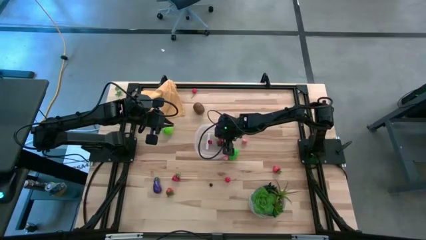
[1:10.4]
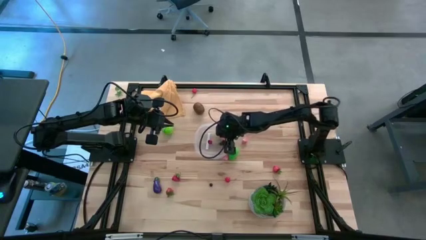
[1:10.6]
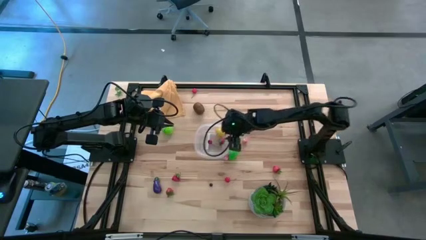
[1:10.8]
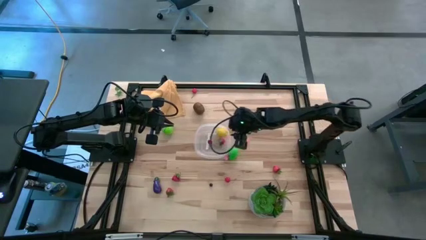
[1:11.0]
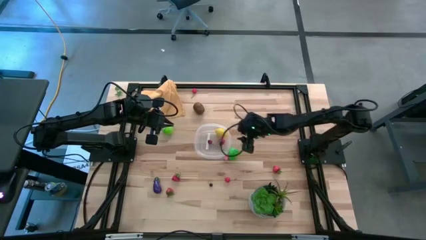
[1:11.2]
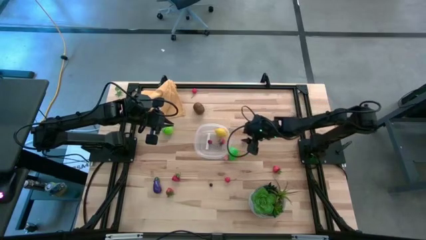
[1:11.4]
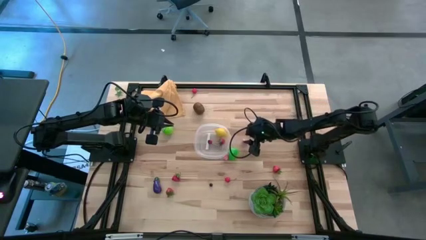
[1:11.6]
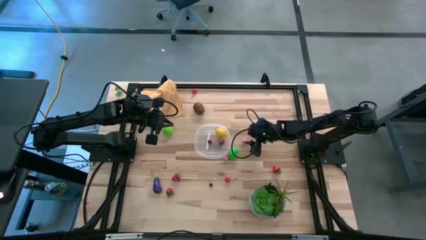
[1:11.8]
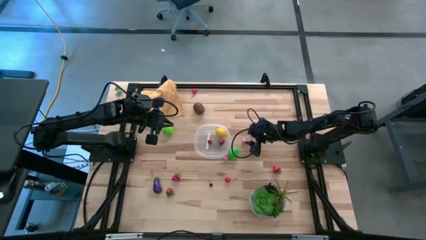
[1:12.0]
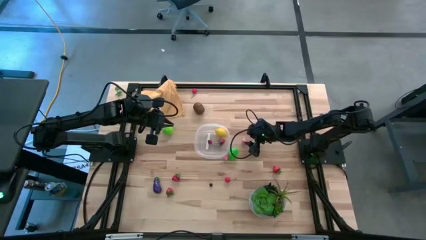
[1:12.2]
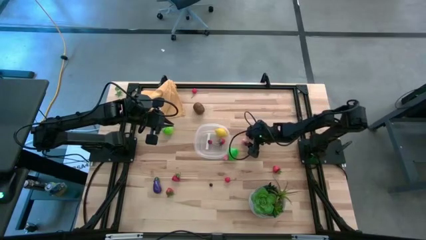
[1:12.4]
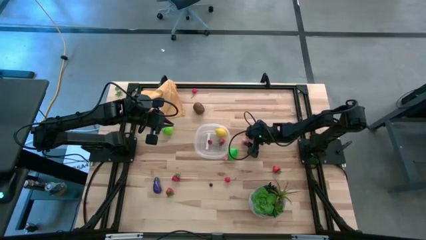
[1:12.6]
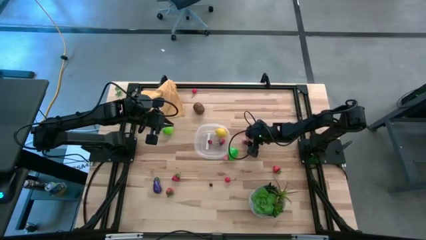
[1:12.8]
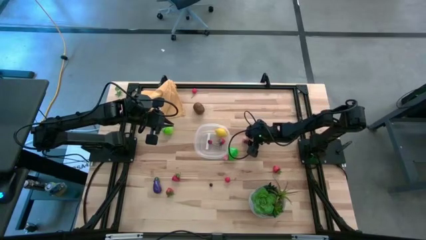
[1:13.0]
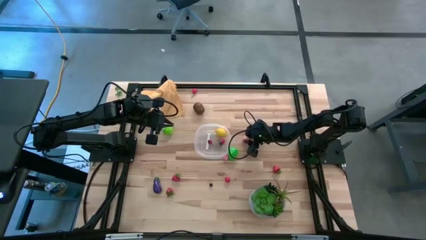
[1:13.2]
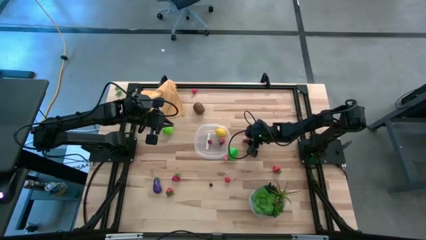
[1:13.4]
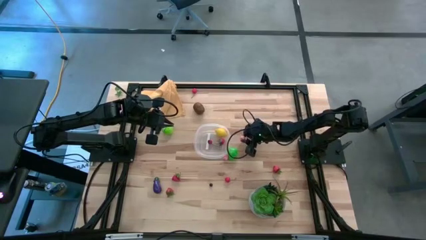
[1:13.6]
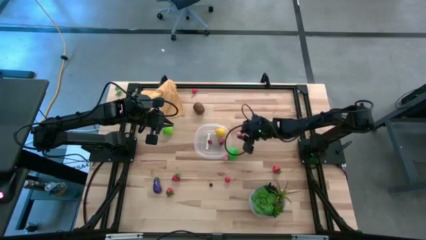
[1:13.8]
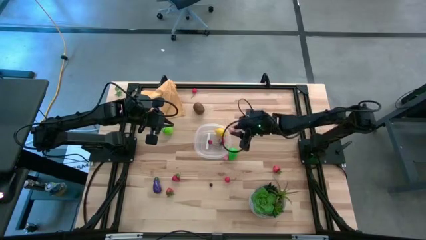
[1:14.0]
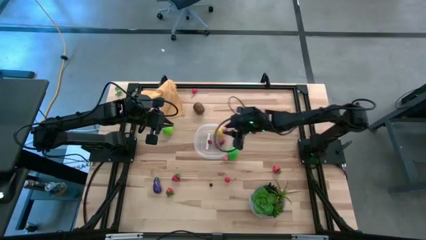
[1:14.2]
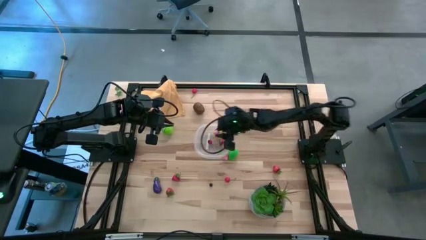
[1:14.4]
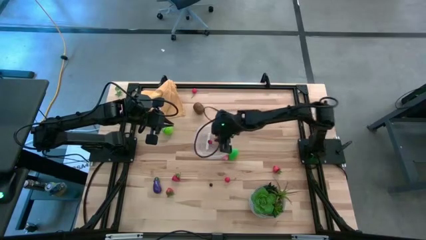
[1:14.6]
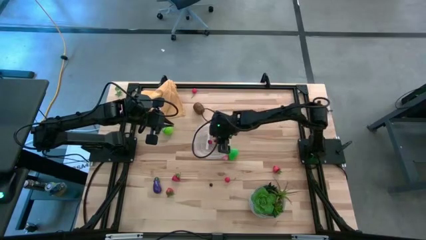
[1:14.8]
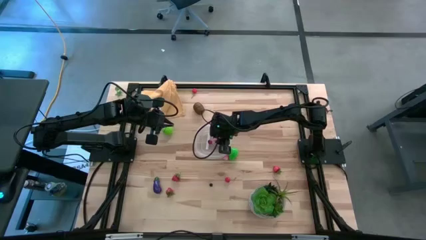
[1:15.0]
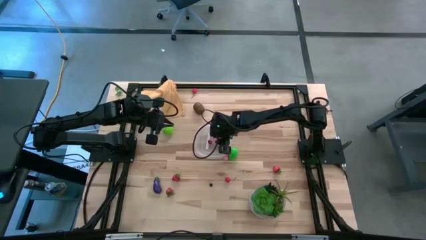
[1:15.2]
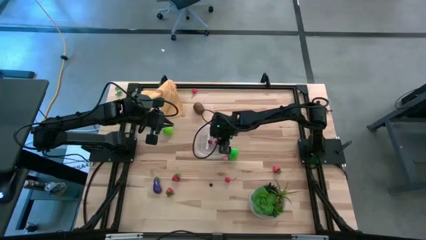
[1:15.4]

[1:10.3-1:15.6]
Task: Pick and placing Produce into tupperware
Put the top apricot into the transparent bin

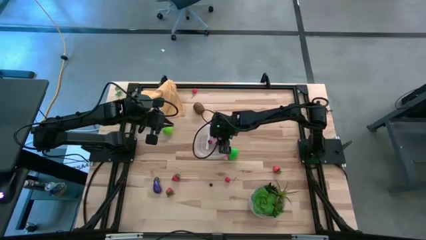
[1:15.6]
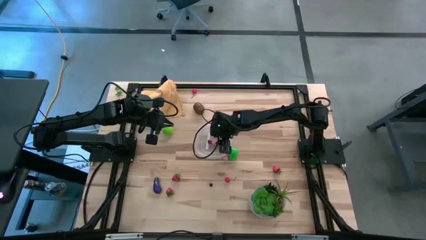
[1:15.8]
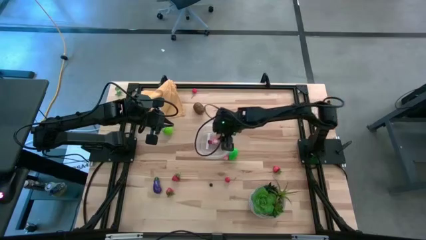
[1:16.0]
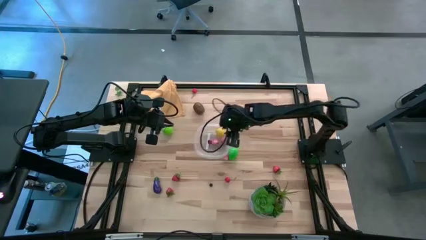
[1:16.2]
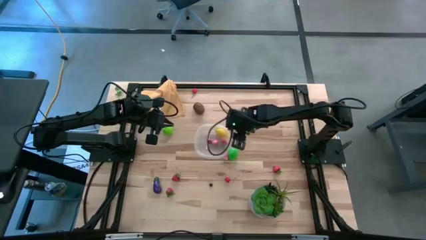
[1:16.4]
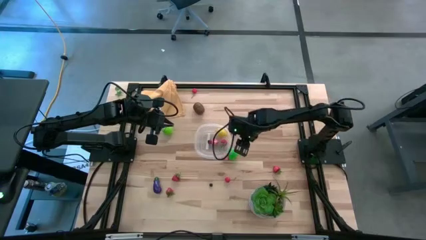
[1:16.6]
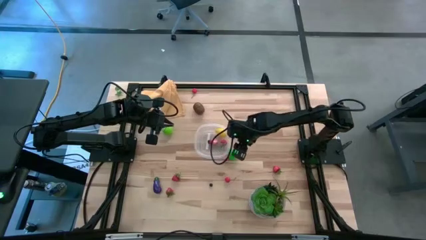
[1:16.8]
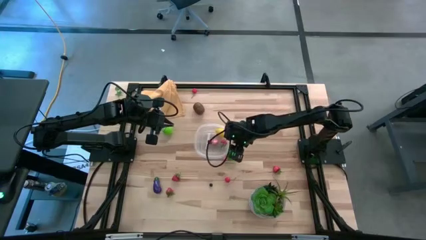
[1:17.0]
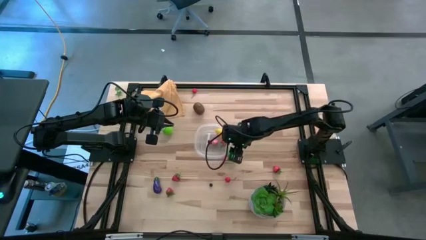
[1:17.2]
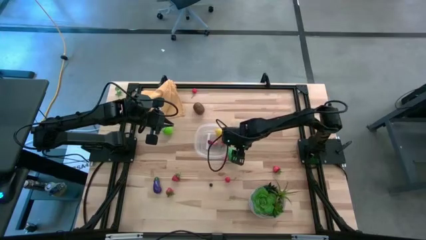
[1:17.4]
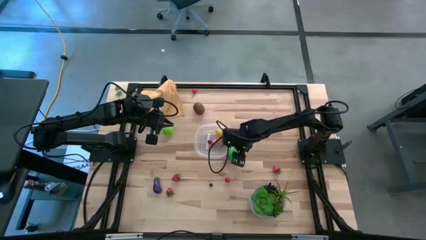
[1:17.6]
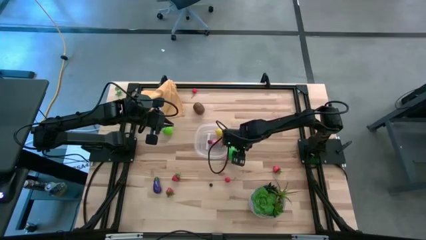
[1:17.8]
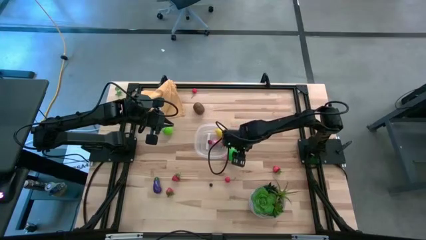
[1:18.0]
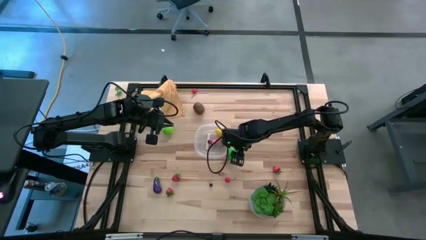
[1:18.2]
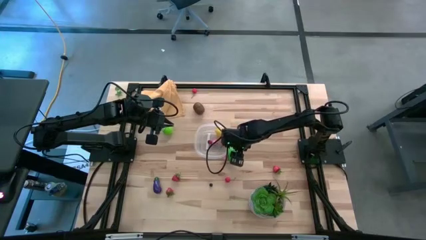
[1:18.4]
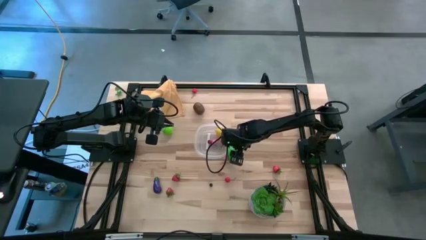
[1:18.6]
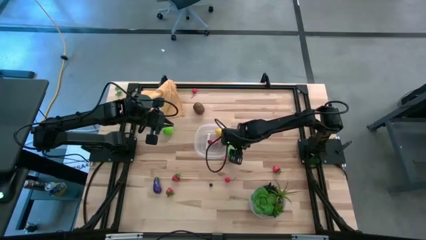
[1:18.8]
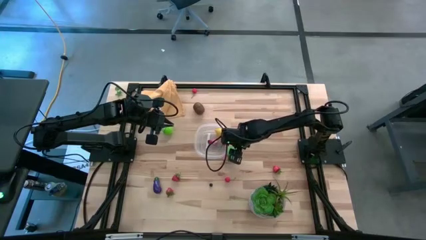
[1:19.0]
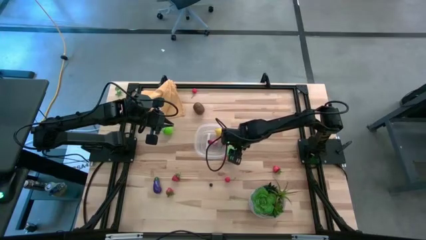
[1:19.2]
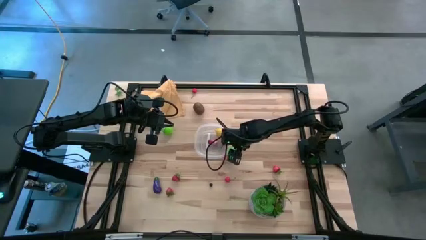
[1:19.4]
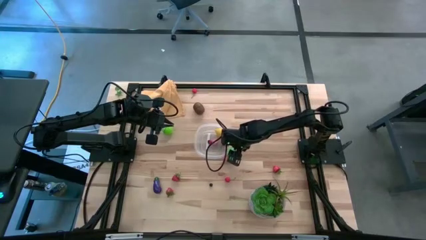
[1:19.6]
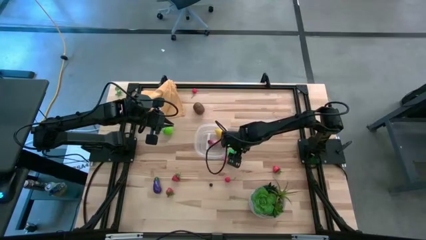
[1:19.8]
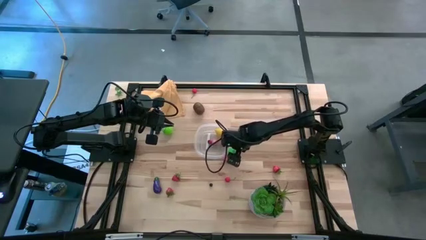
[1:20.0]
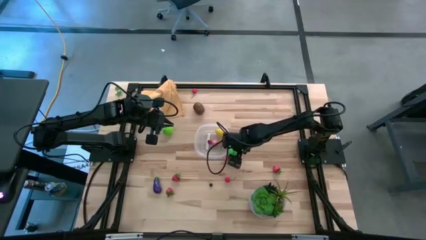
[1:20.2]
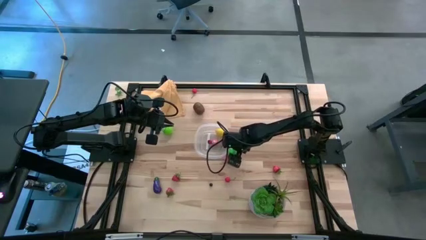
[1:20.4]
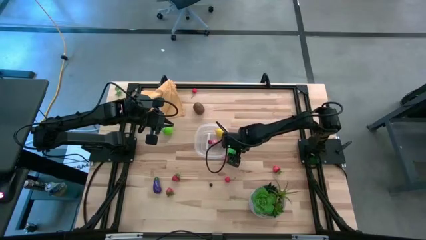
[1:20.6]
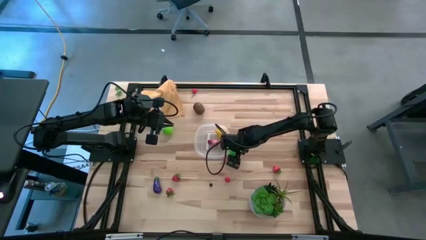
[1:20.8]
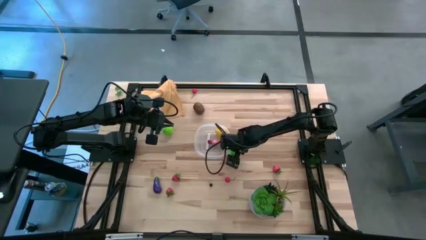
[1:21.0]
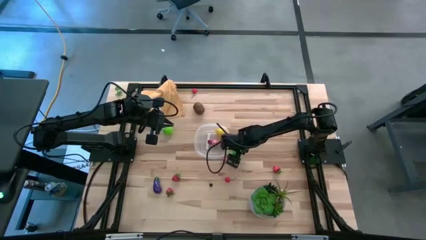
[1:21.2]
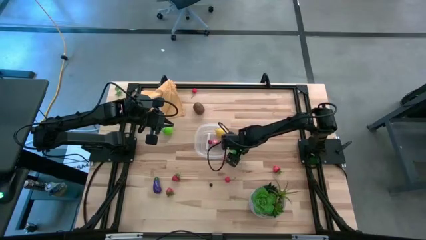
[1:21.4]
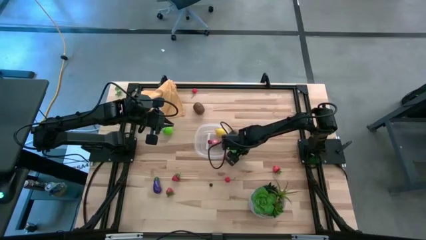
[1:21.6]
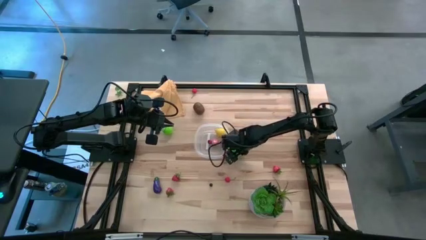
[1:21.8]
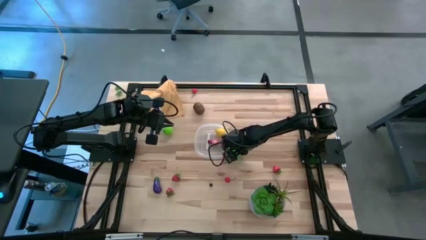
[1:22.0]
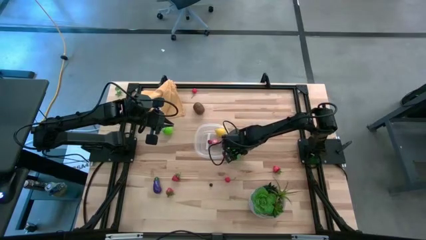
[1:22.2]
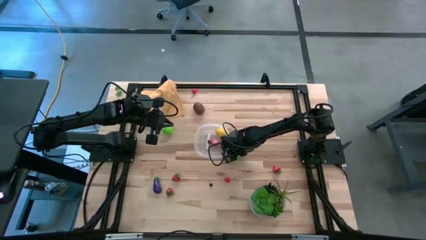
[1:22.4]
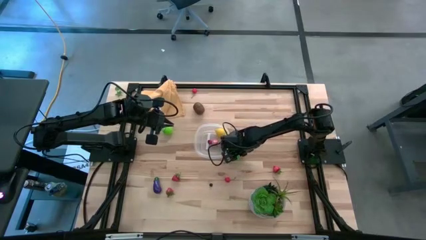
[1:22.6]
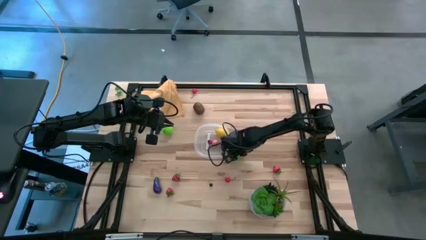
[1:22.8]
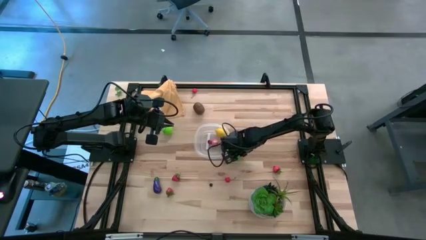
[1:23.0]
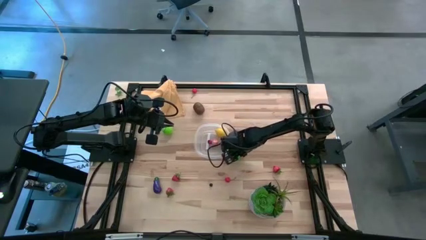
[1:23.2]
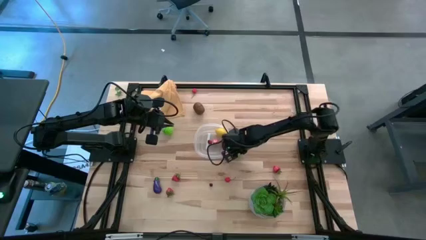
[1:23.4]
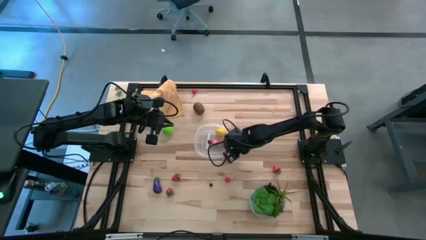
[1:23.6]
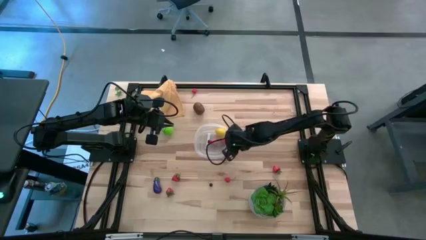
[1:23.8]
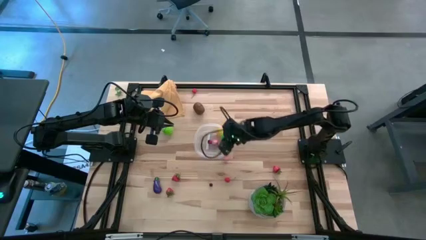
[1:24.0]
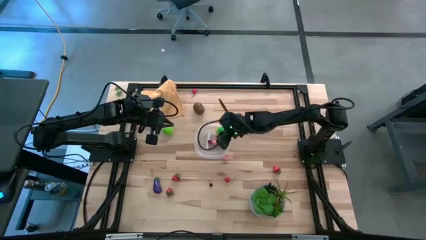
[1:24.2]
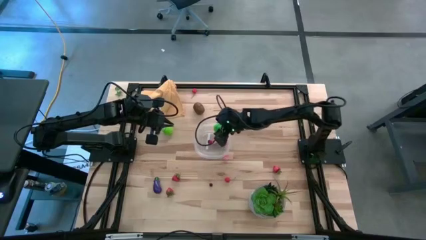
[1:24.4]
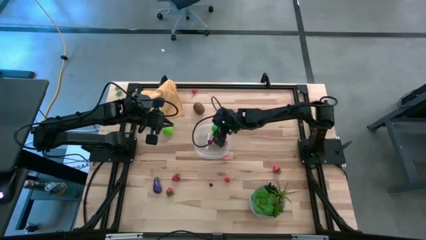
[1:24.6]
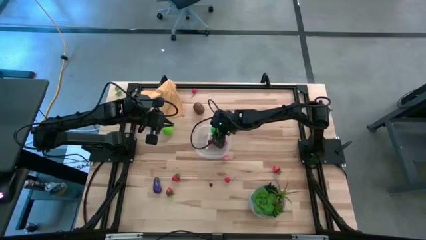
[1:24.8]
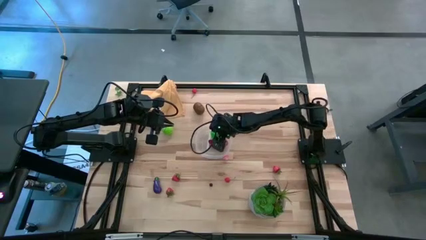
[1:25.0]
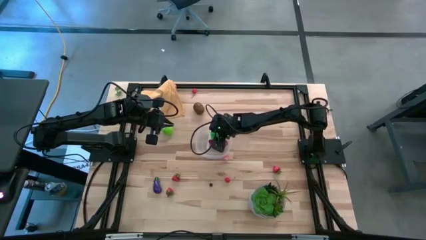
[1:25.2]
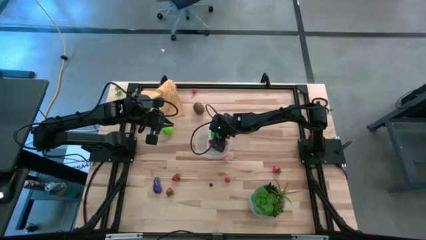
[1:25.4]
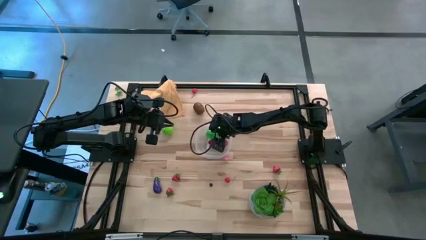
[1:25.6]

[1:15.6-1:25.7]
Put the green pear into the transparent bin

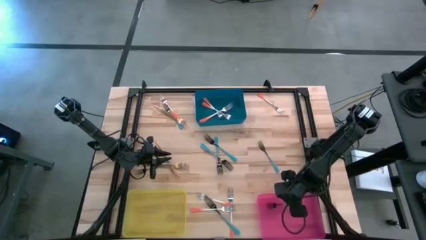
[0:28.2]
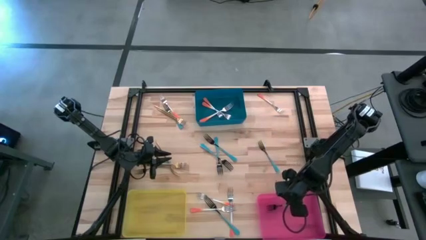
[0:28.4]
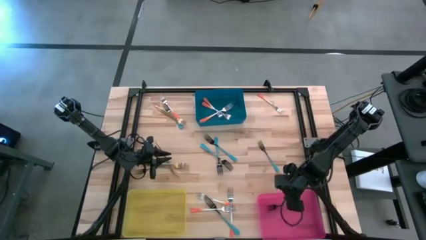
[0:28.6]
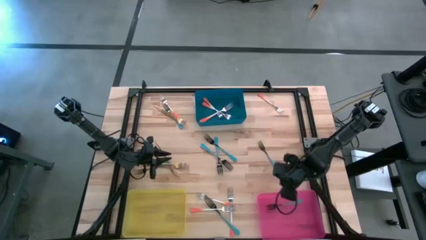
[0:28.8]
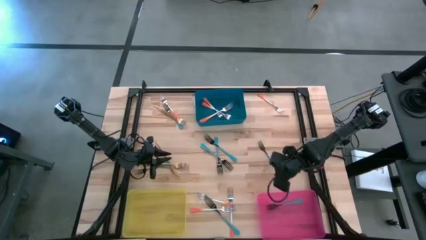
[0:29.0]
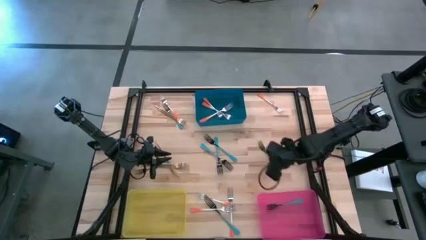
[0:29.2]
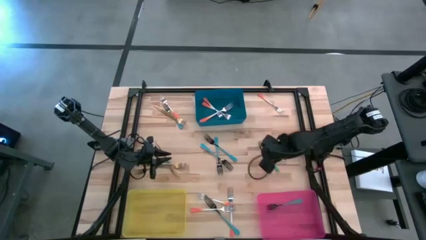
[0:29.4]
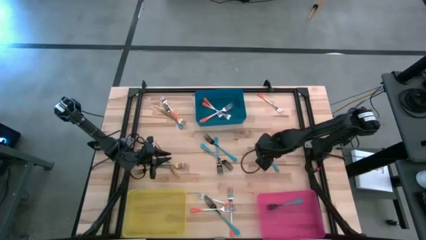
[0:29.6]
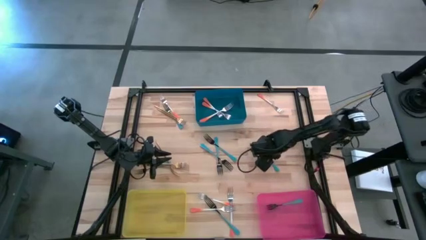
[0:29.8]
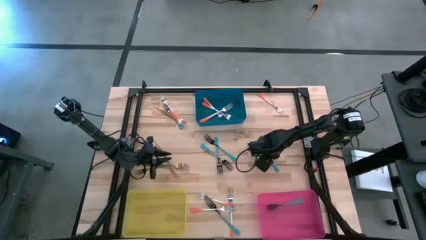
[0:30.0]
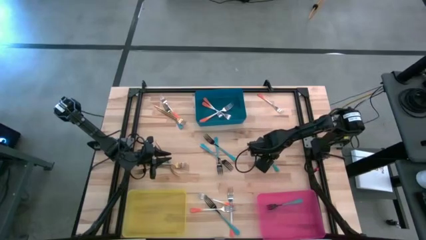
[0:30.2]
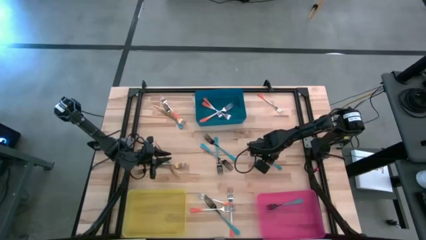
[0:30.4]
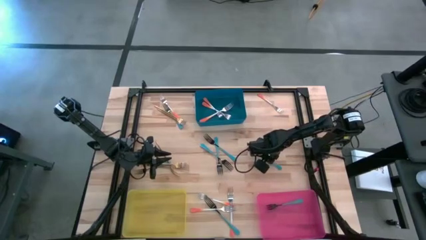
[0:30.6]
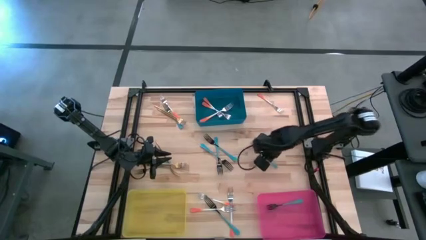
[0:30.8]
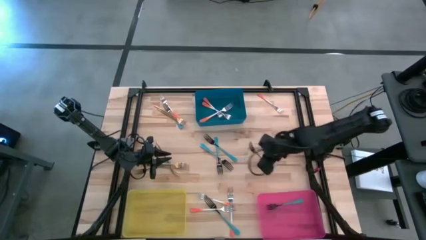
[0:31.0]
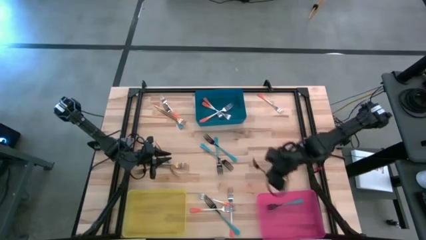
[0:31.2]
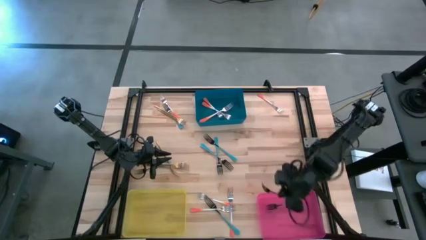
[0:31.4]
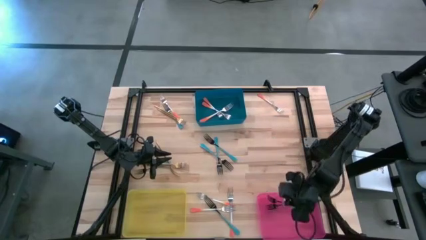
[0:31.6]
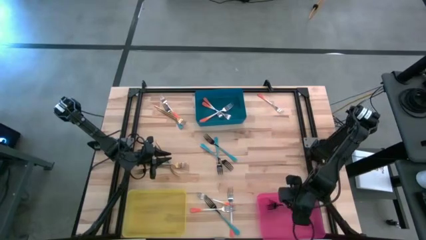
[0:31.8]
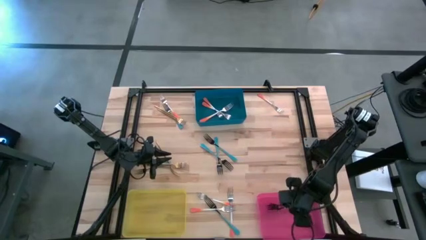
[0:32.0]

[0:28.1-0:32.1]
Task: Sort silverware by color (type)
Put the blue fork into the pink bin
